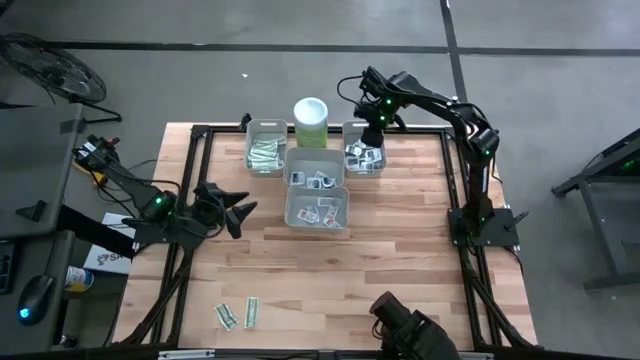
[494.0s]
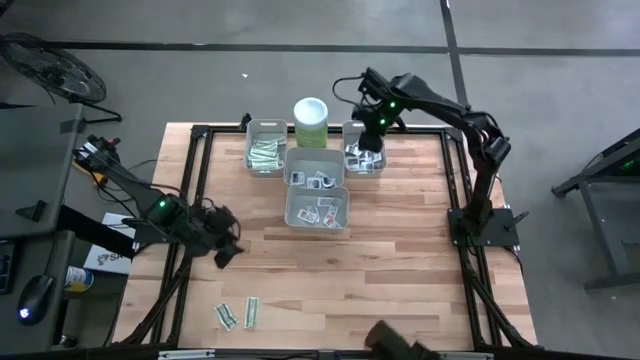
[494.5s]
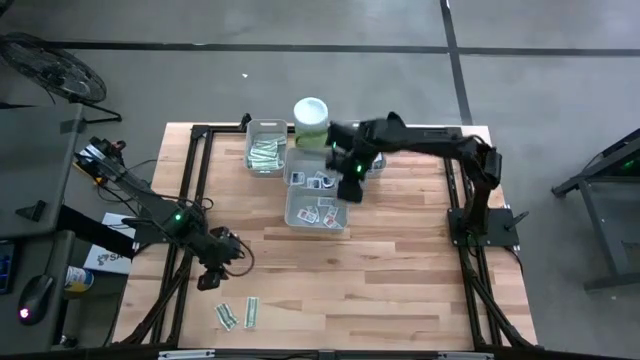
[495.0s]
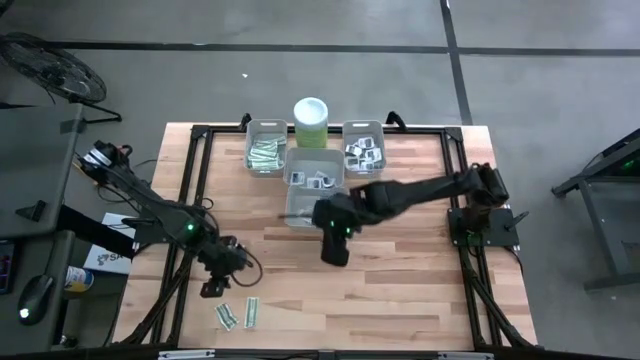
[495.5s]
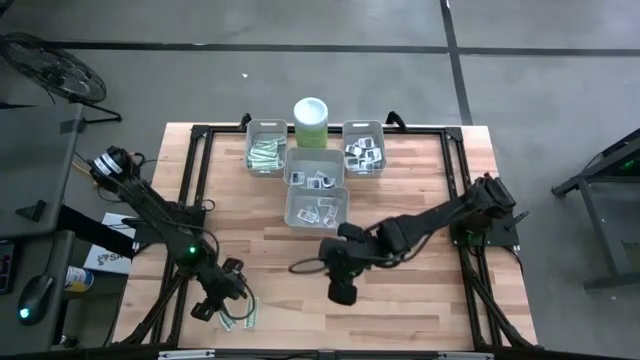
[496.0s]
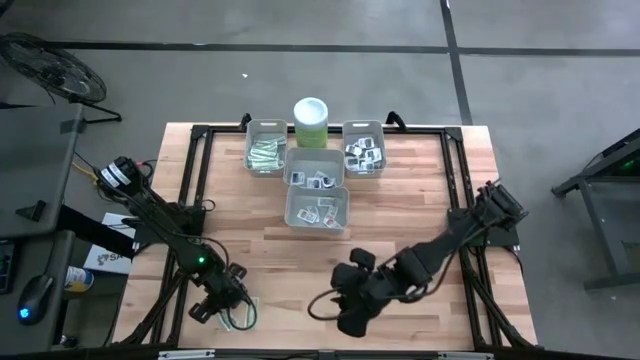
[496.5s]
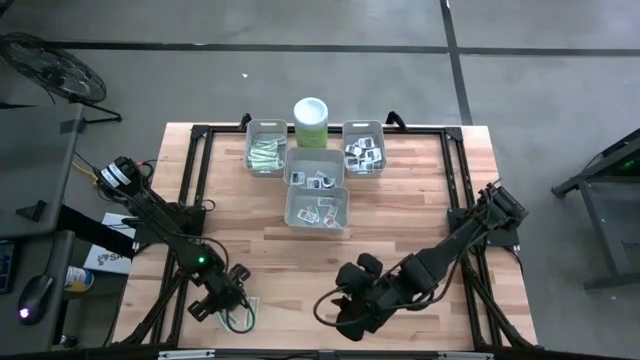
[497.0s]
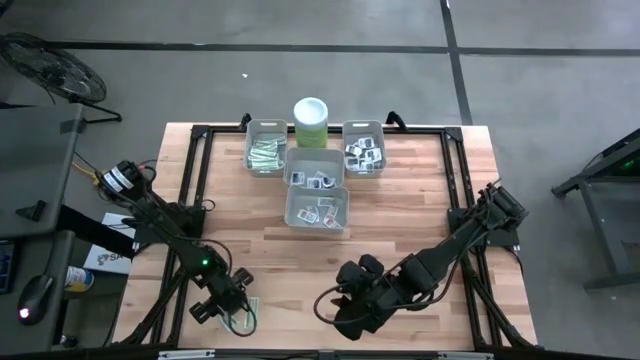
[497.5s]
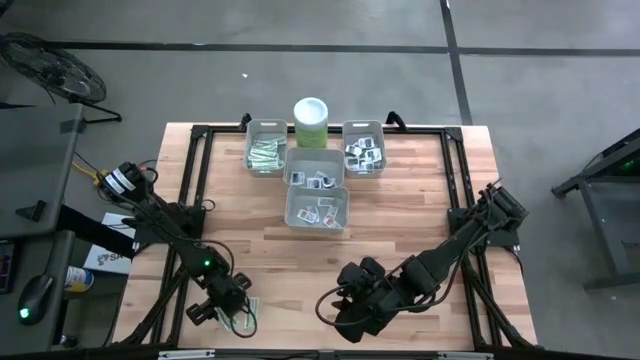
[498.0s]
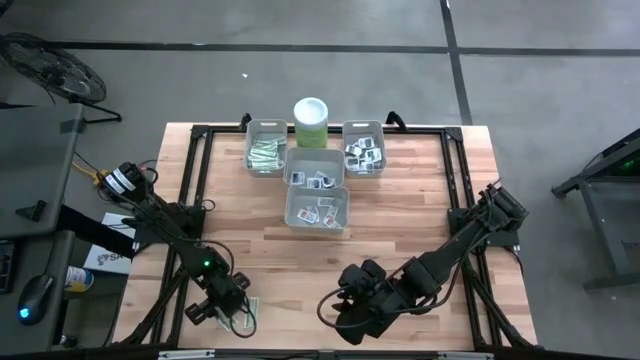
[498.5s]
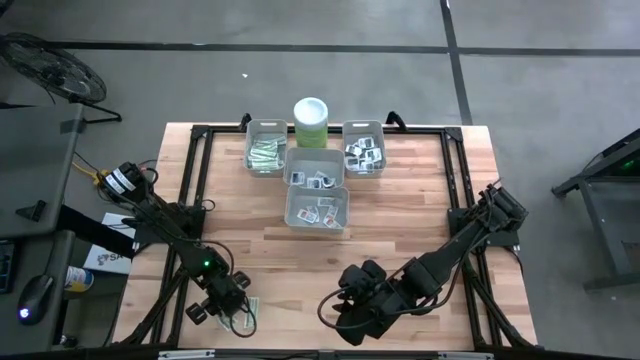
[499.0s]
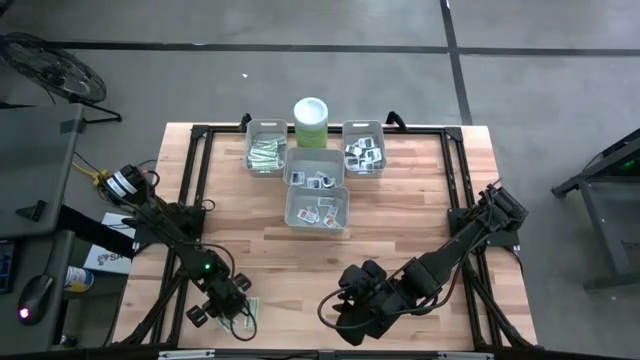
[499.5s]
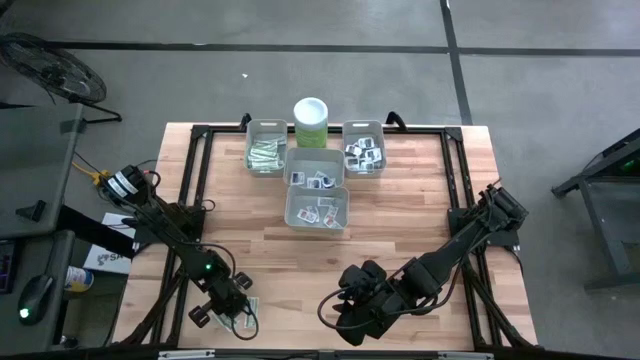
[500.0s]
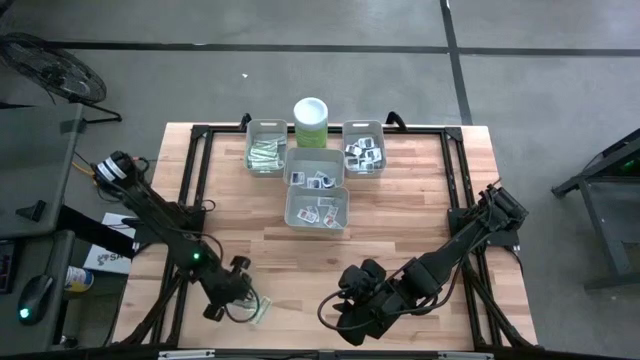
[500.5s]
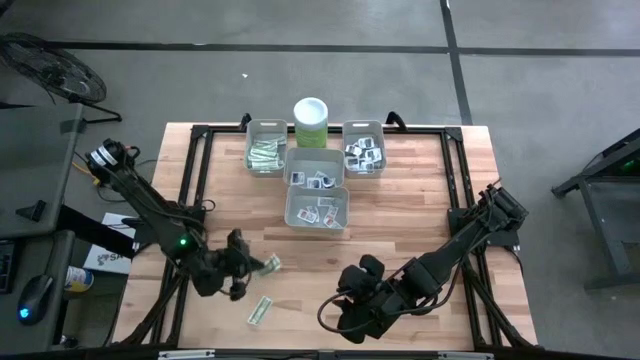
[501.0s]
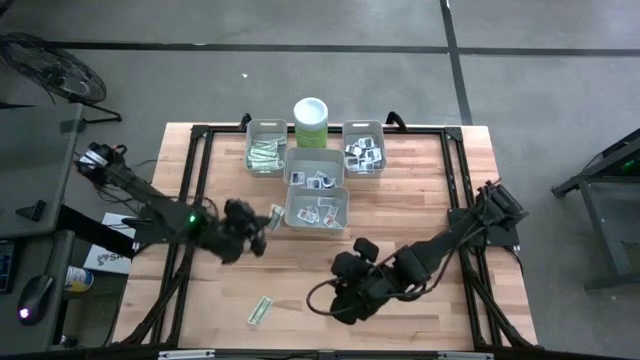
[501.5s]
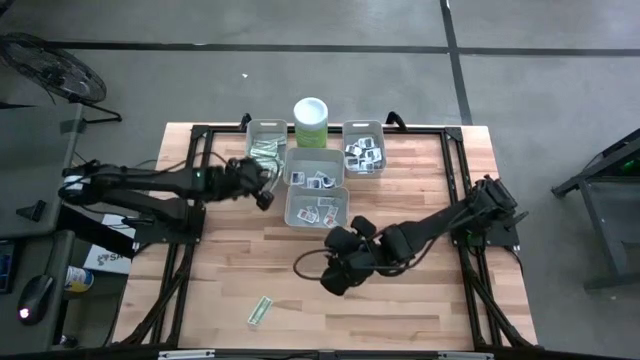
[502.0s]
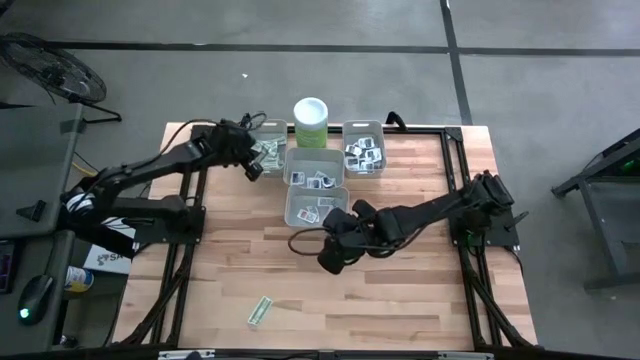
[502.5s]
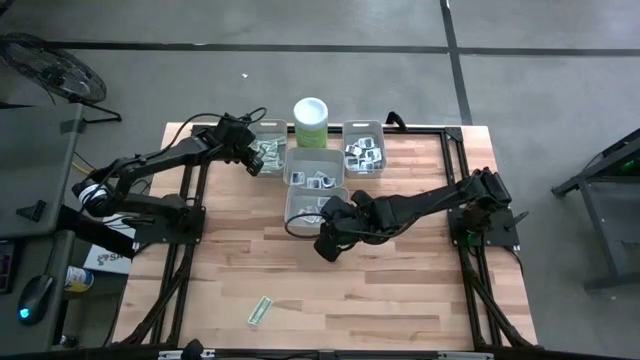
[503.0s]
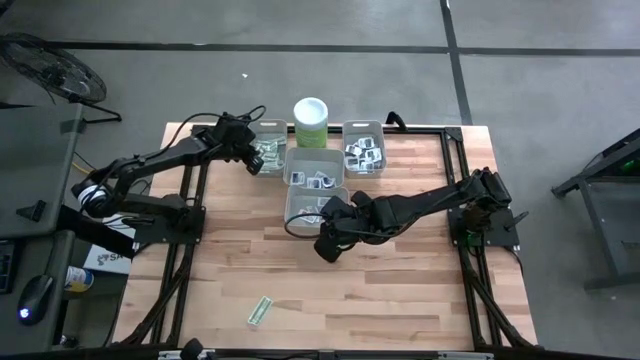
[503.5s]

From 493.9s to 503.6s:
Task: Pick & Place First Aid Supplies
Put the left bandage pack into the left bin

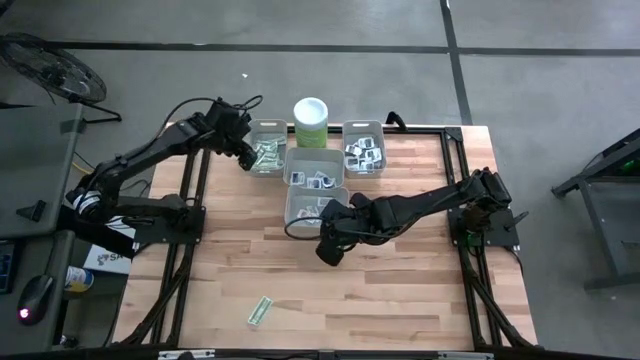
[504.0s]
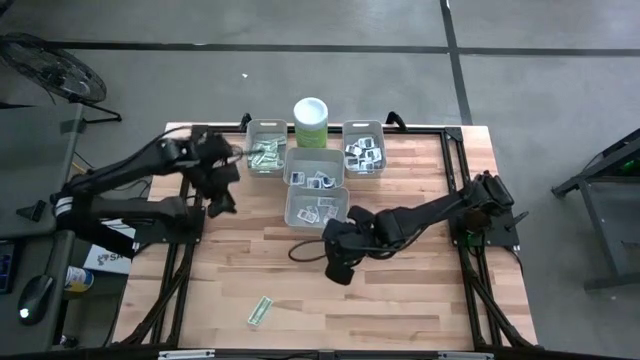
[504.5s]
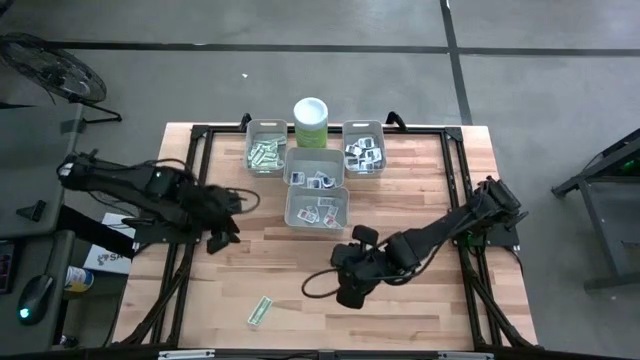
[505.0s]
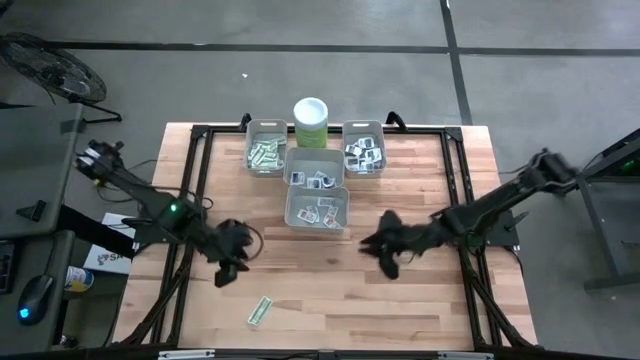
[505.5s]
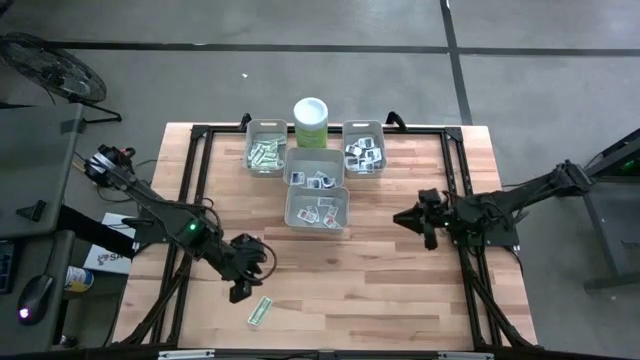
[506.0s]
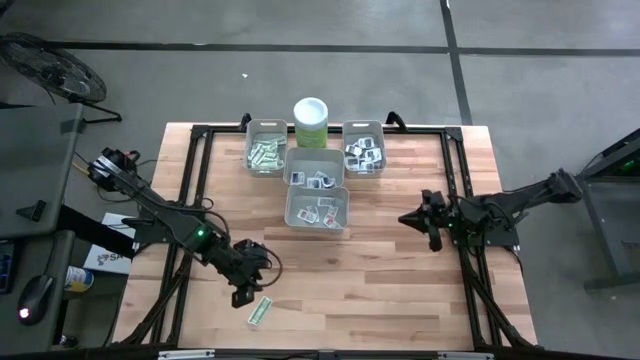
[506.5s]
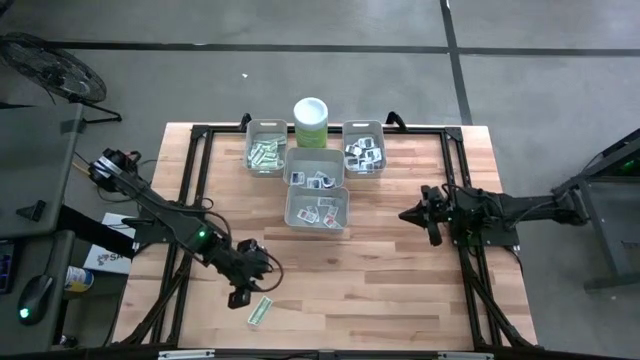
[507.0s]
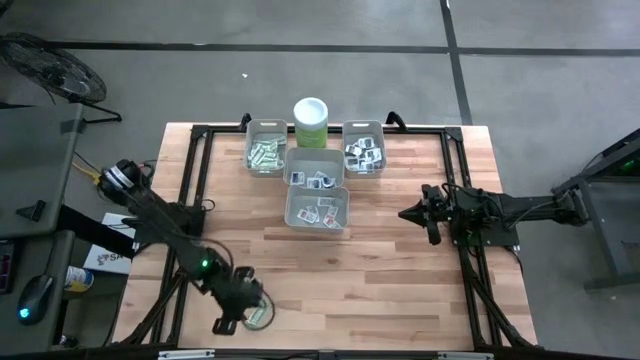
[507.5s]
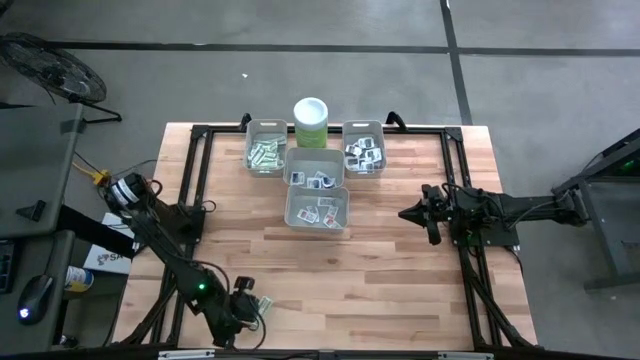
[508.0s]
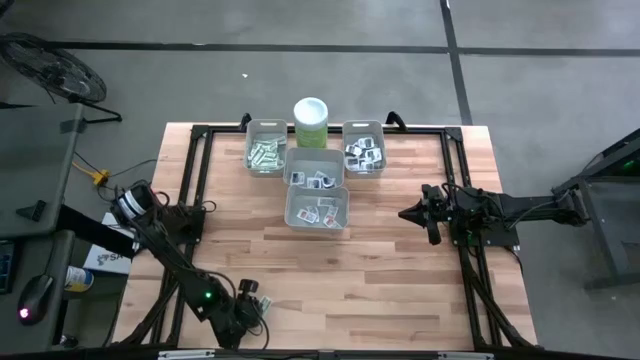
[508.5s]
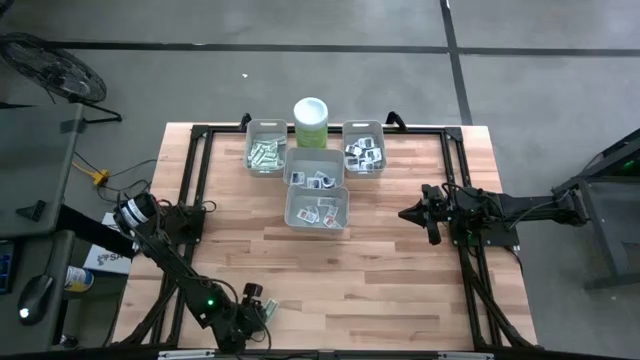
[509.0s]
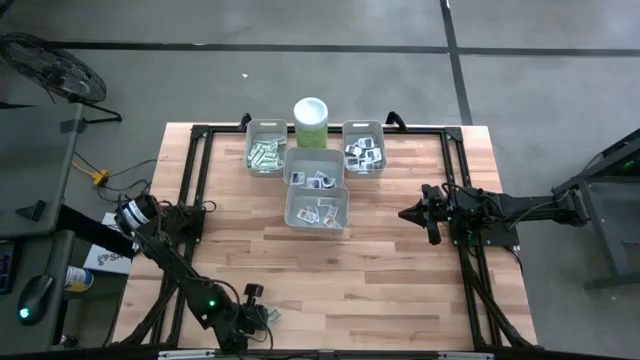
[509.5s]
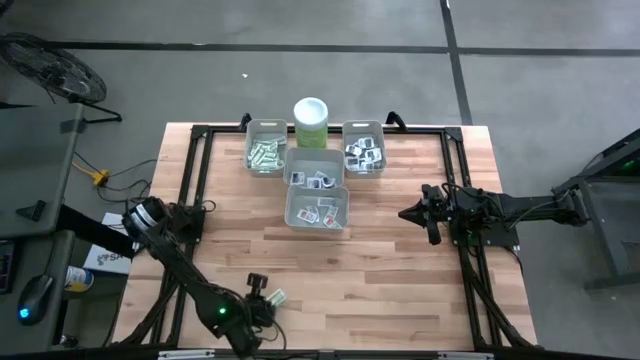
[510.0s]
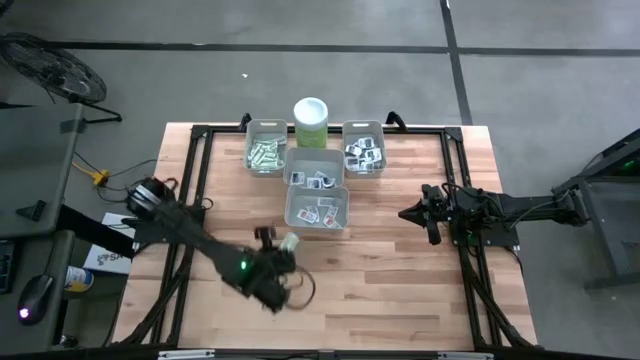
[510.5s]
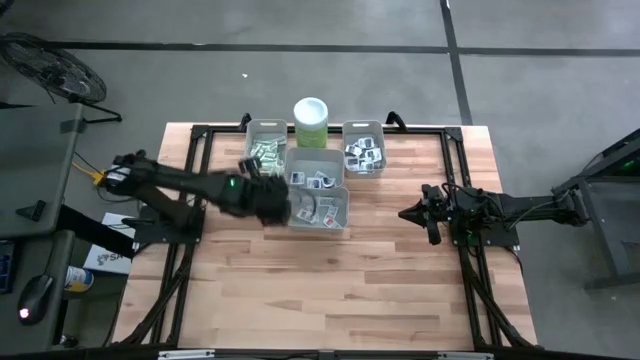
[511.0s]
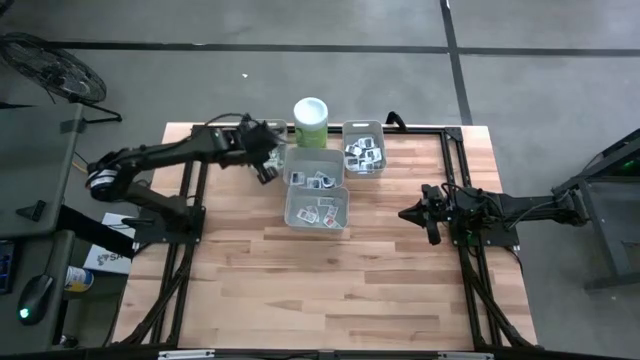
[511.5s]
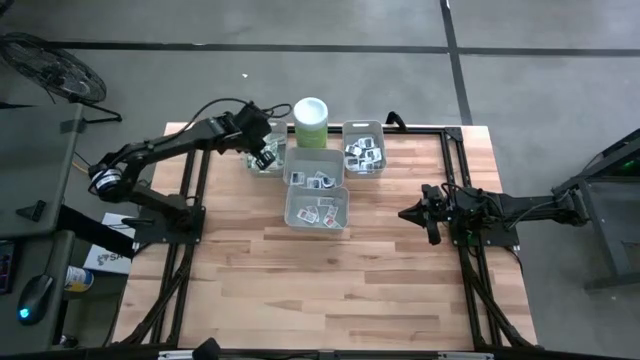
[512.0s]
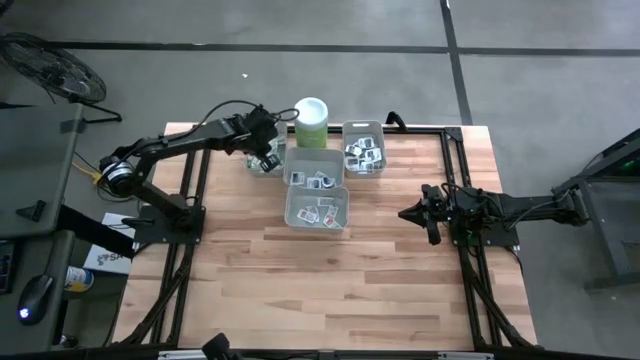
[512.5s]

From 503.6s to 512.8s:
Put the bandage pack into the left bin

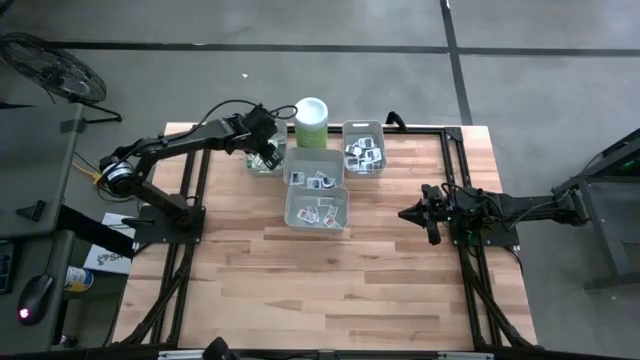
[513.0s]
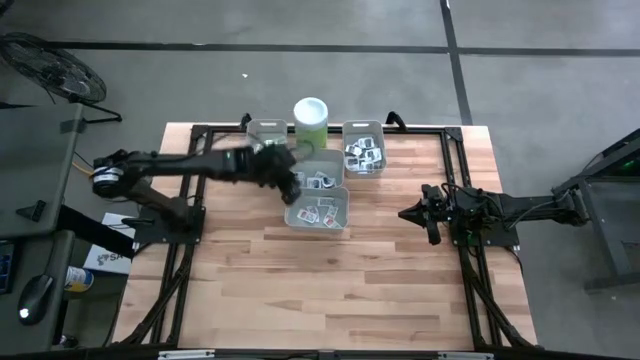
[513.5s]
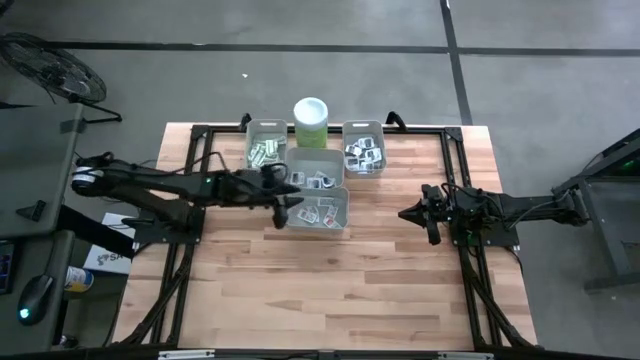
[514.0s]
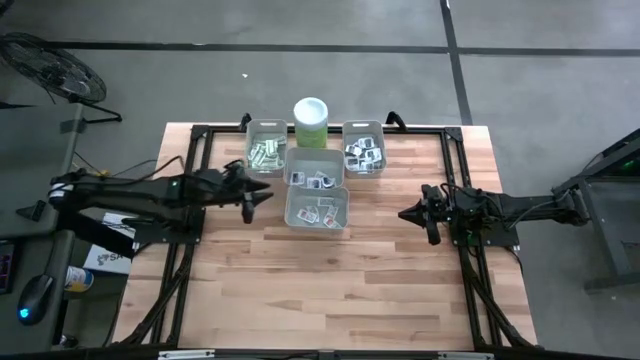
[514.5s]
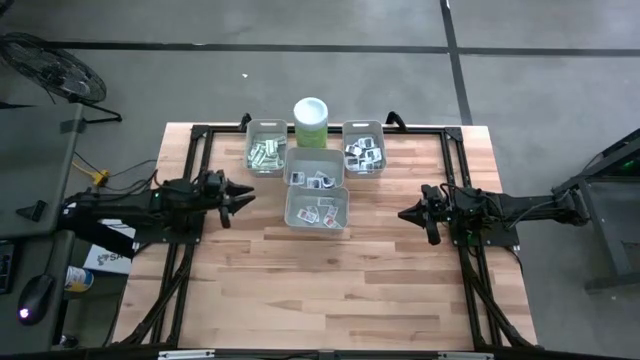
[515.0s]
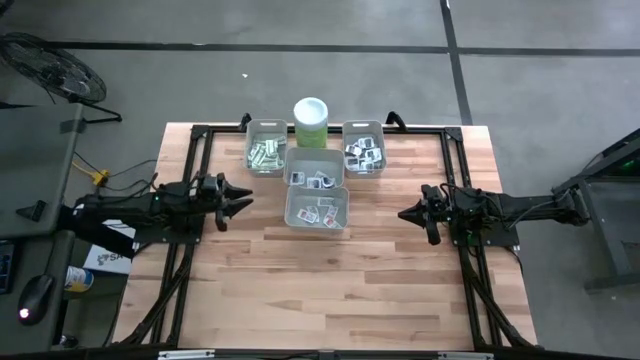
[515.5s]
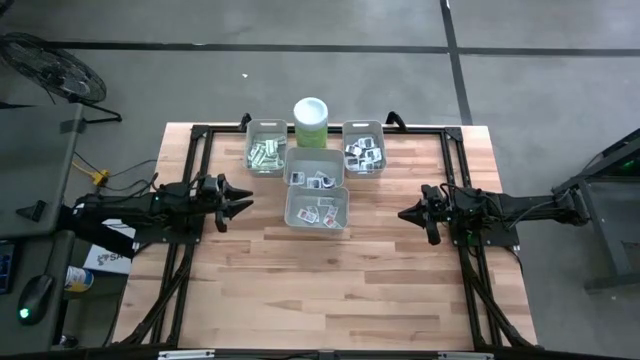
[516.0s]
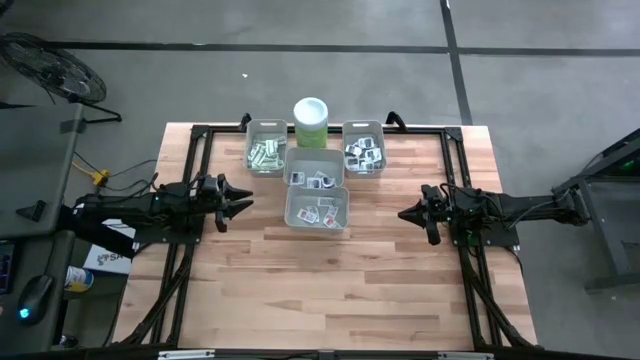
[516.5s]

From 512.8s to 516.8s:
Return to Home Position
